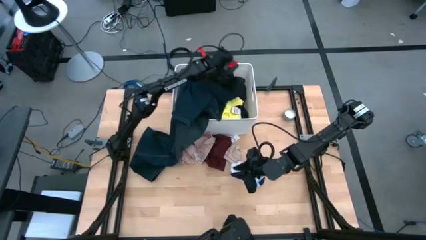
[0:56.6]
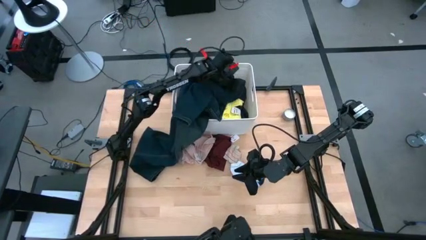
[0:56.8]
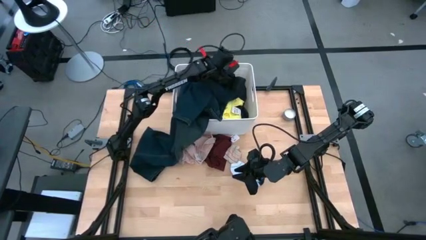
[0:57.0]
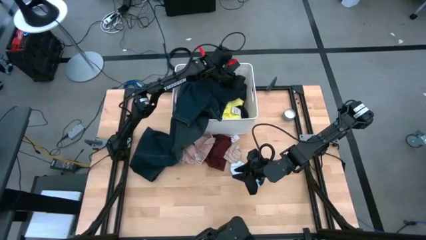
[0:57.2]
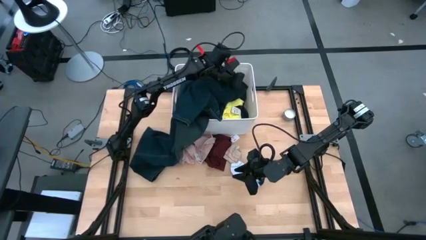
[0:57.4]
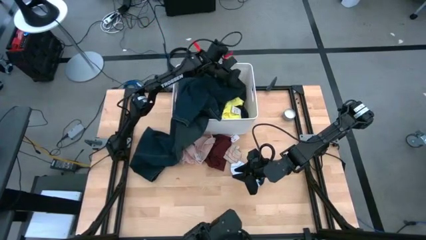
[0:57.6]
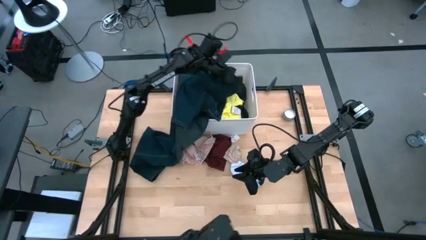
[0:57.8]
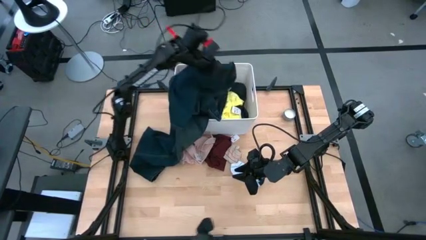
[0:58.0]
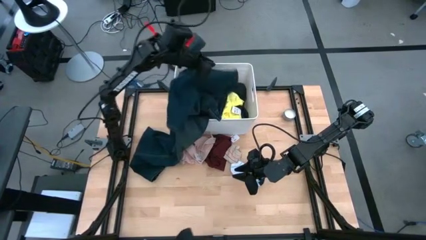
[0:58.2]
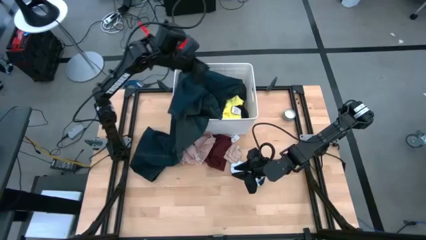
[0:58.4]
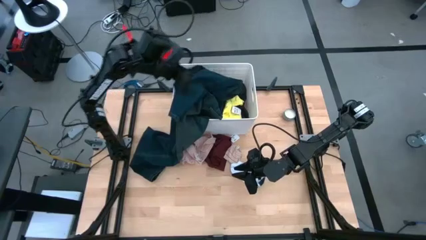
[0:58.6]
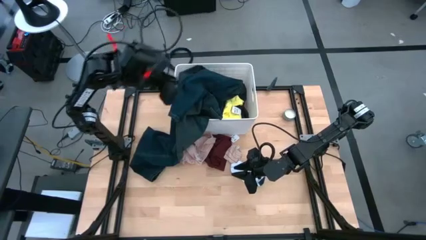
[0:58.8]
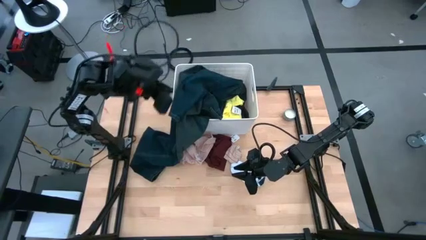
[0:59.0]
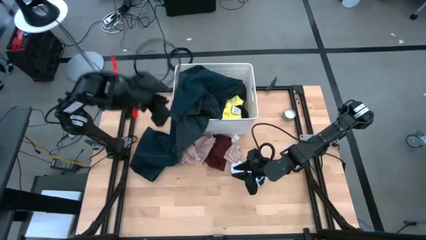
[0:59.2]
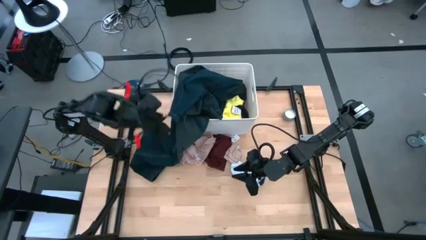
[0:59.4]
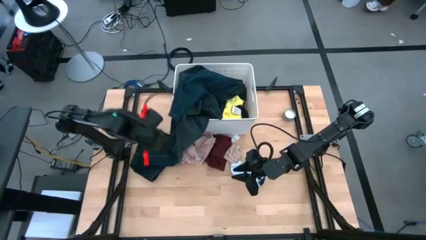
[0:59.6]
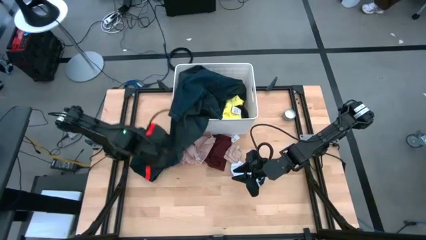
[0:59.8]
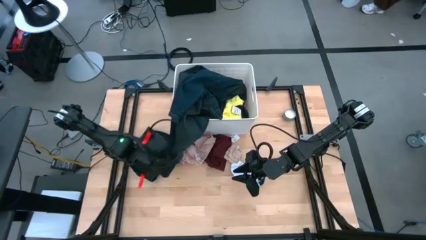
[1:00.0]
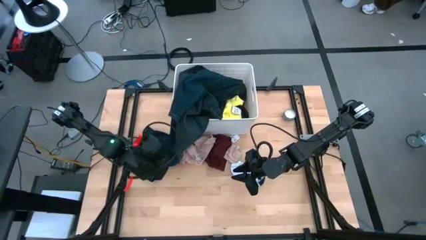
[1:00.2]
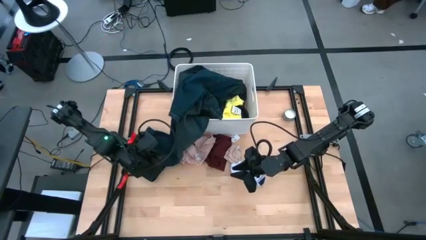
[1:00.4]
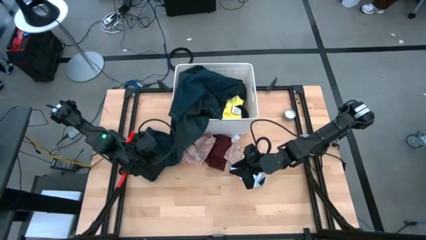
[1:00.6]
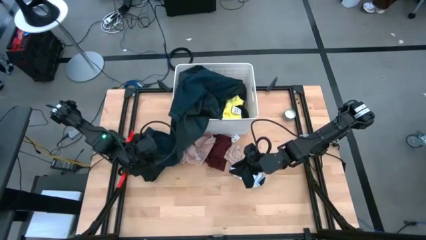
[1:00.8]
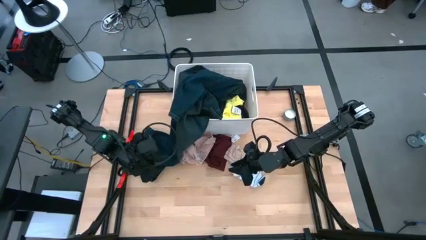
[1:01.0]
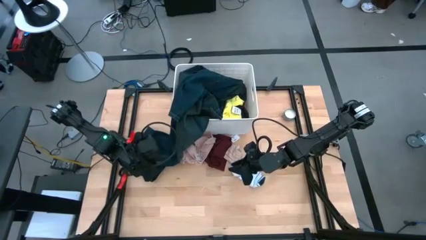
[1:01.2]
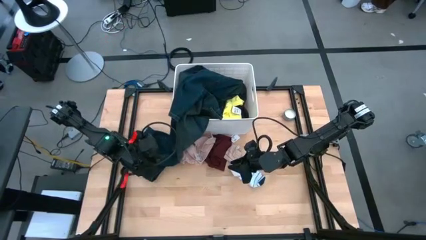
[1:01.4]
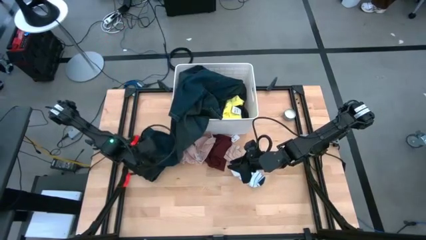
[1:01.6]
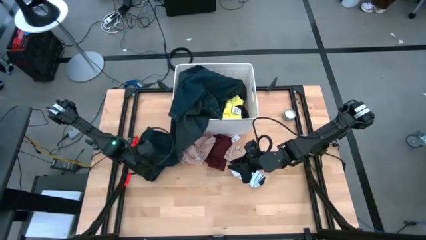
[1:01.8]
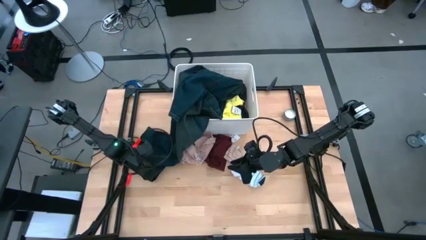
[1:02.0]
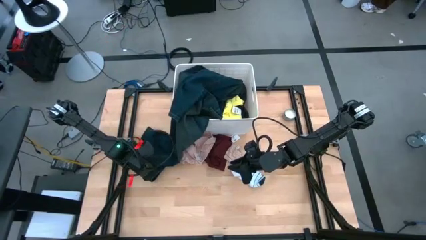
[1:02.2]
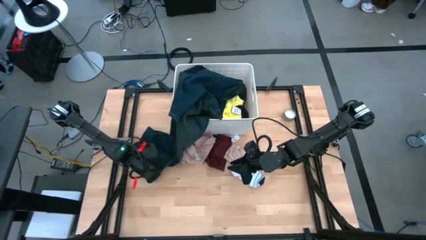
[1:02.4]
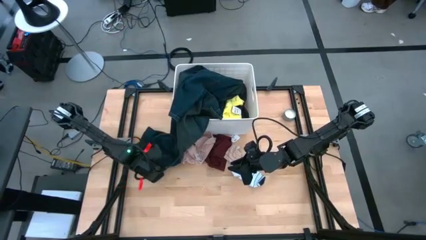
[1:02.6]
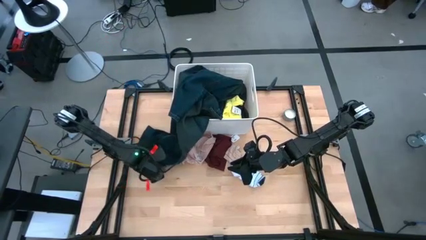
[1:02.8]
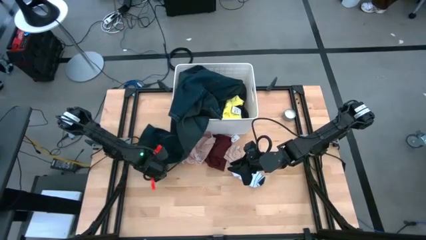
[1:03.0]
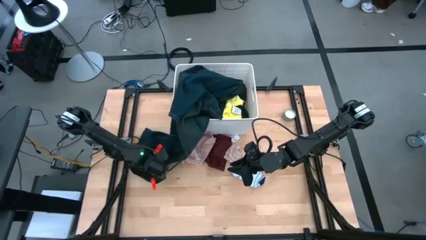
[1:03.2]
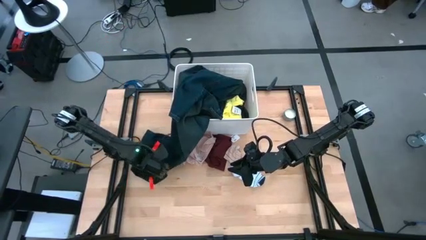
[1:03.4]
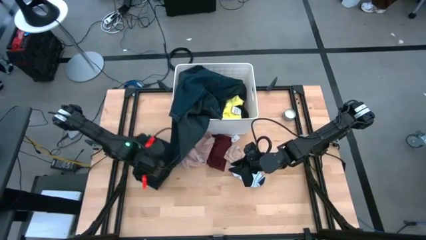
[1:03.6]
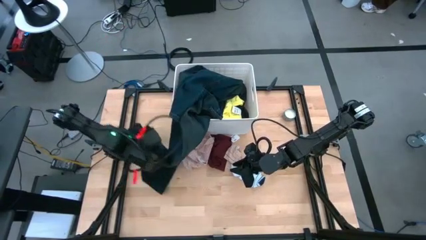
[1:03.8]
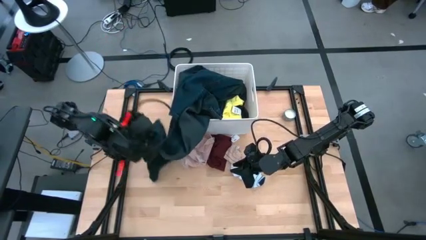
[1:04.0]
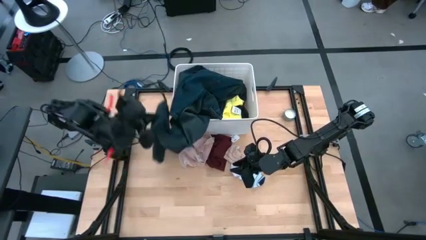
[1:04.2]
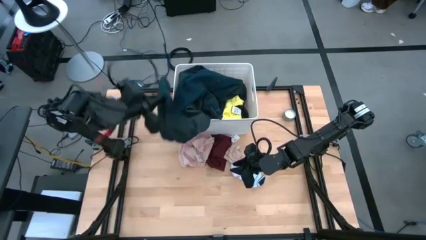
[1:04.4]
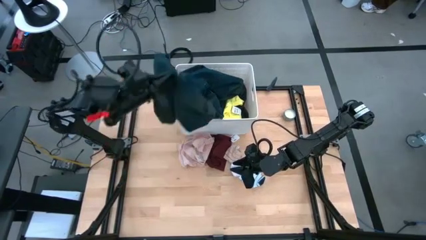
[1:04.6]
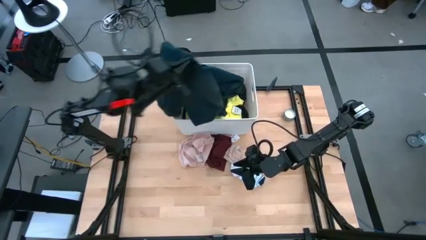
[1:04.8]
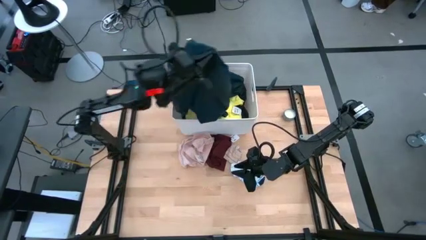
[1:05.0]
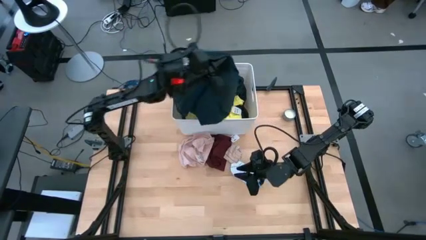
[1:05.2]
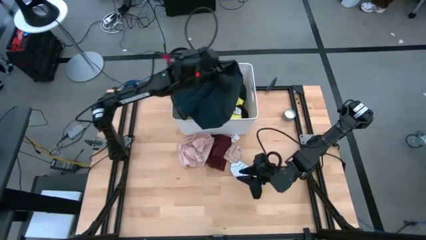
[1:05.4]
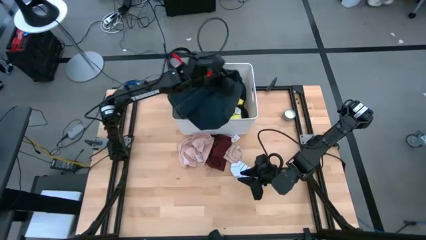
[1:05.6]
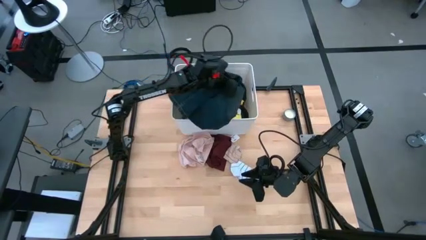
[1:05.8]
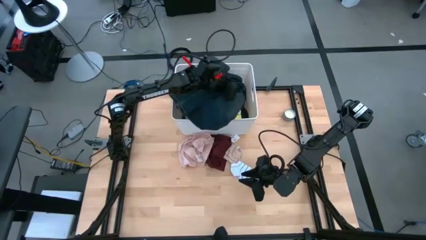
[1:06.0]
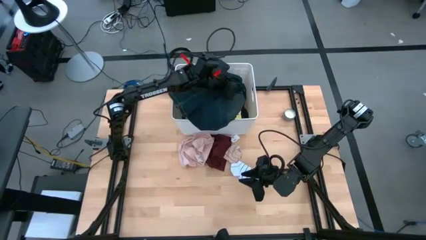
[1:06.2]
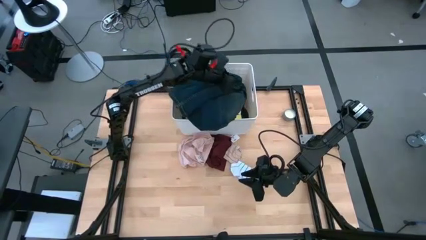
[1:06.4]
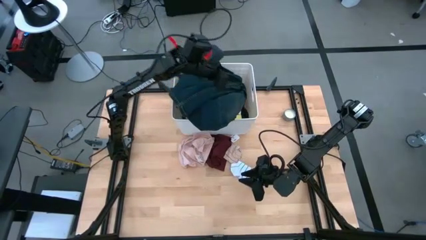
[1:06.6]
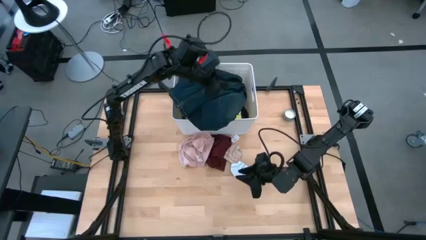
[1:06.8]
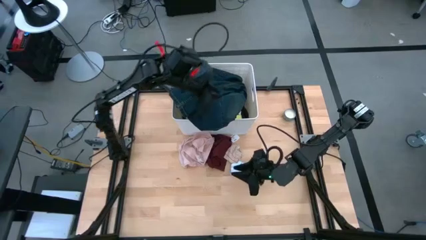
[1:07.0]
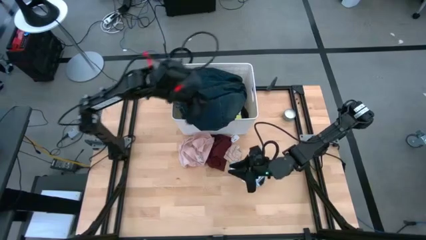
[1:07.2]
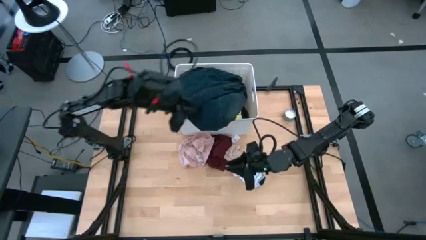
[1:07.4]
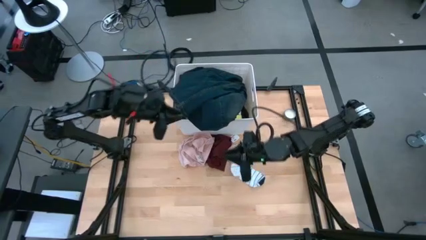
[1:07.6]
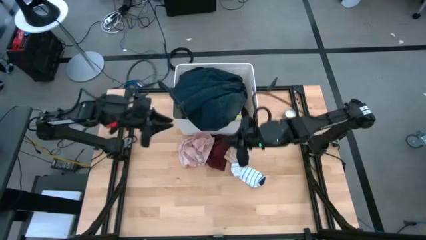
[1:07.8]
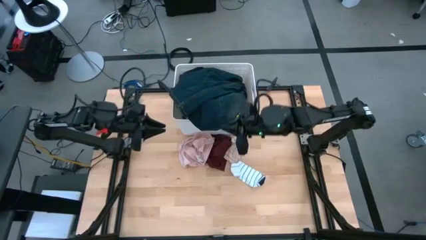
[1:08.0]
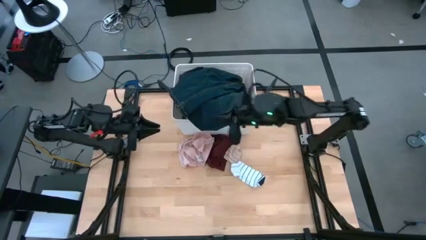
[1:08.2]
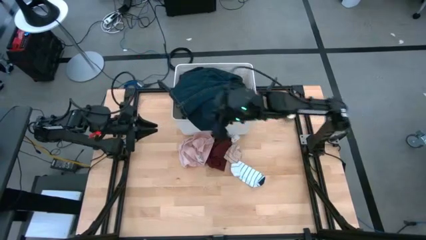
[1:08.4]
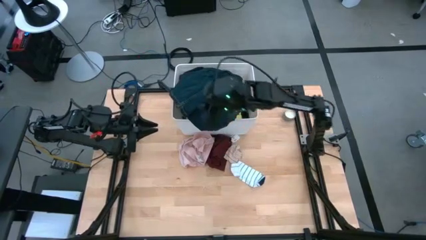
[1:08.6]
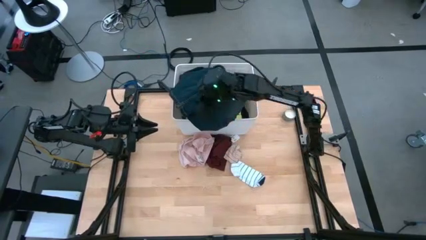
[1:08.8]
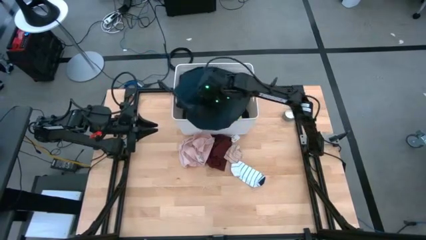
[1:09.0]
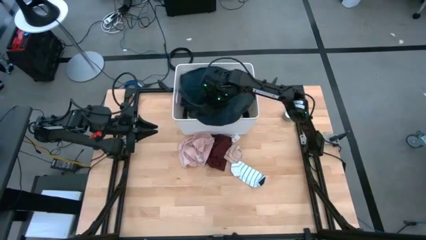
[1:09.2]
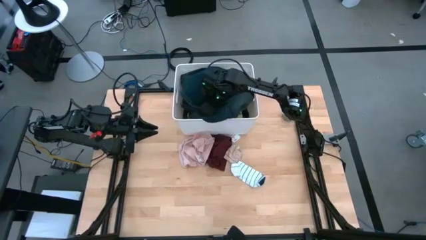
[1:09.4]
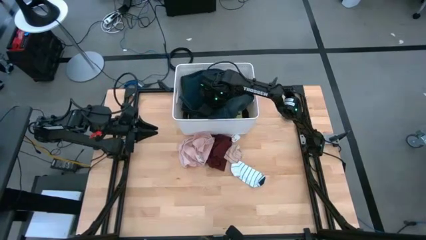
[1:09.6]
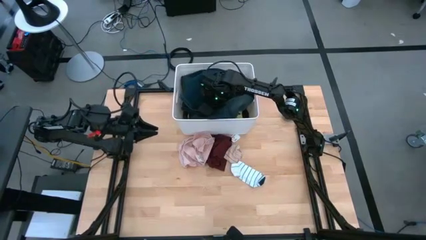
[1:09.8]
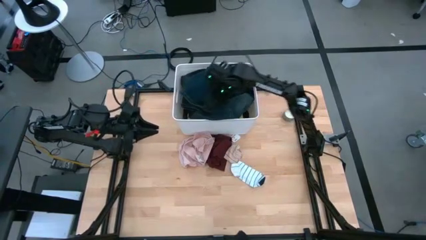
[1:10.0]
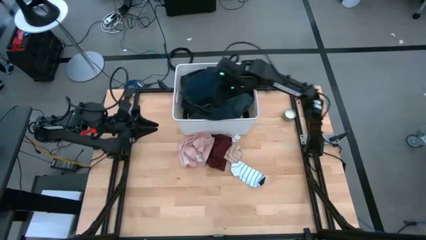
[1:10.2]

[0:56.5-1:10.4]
Task: Sort clothes
Put the dark blue jeans into the white bin

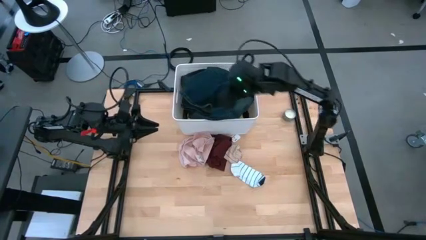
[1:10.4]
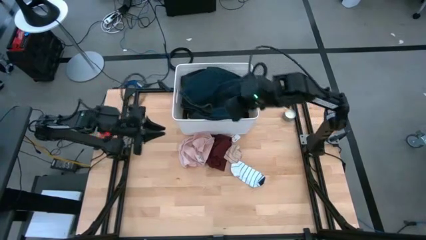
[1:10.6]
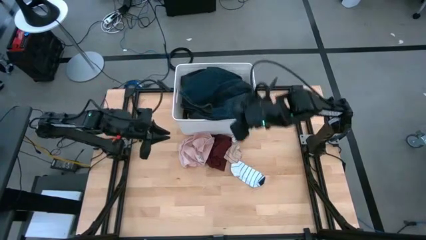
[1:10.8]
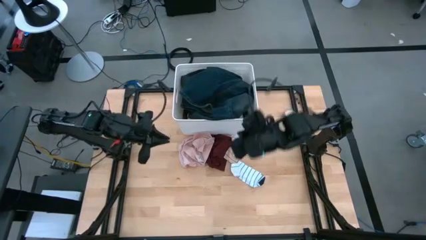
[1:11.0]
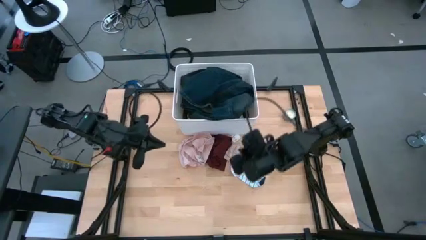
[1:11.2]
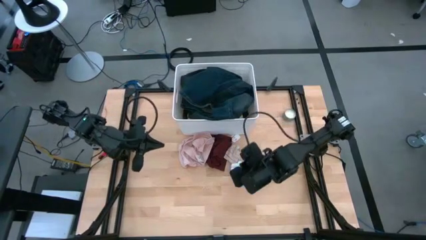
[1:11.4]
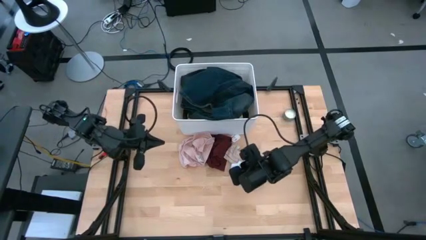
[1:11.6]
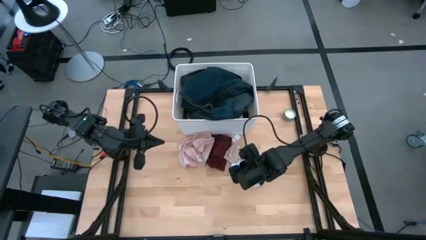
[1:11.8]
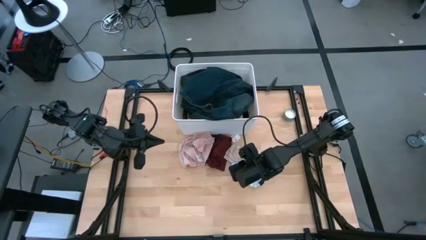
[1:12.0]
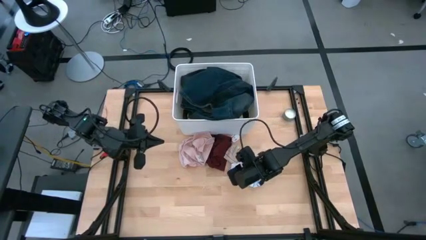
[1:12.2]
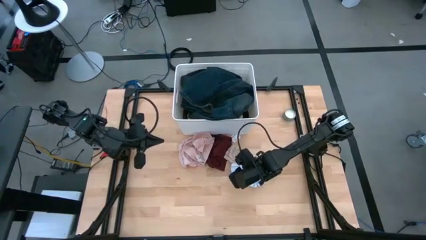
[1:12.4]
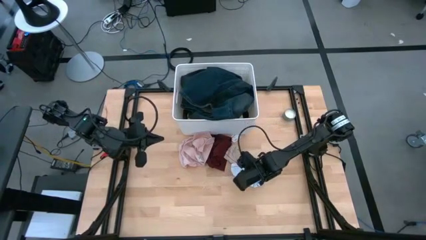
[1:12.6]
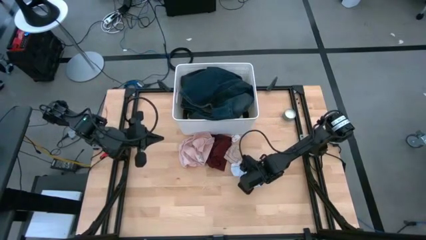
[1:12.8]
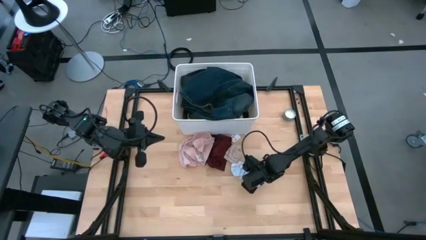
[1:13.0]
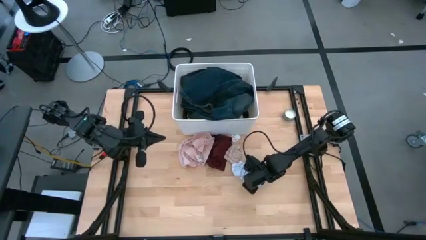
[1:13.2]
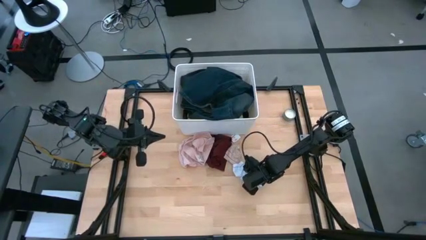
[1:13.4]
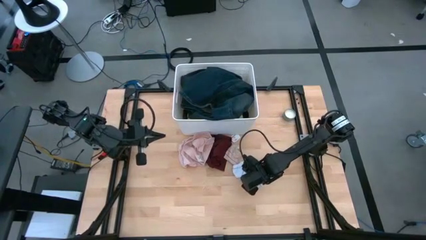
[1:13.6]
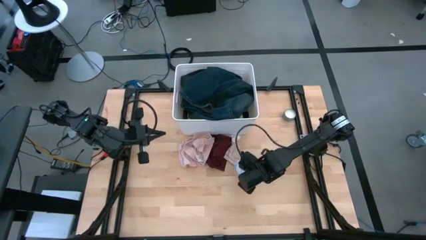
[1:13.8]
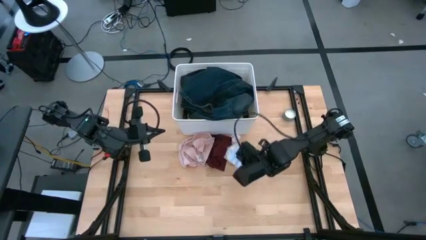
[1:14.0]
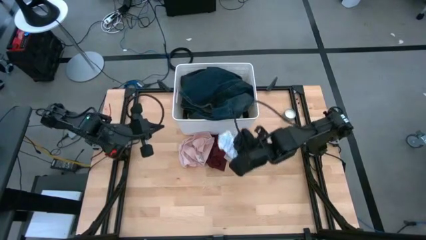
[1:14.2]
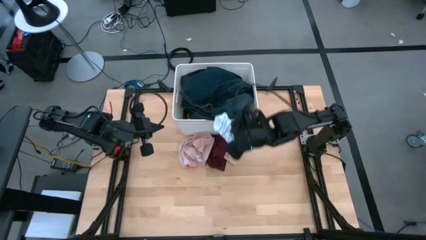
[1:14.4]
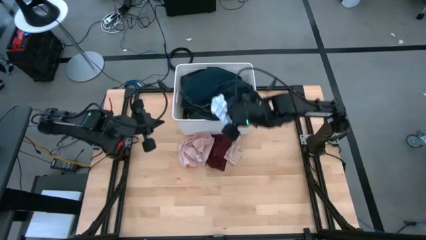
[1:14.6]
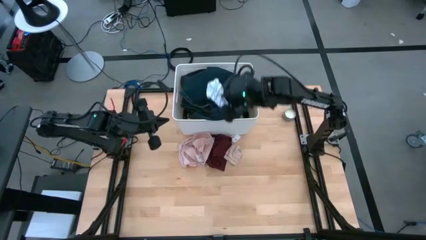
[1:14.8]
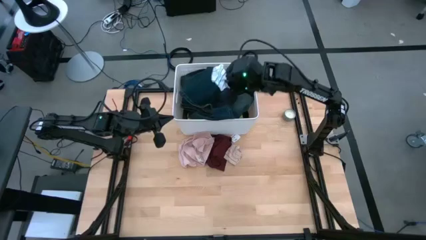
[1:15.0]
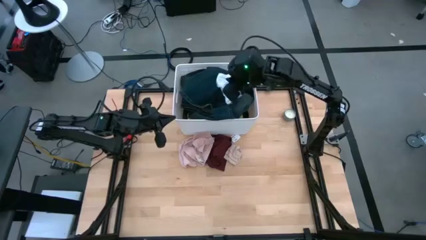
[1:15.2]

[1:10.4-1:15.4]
Put the white sock into the white bin
